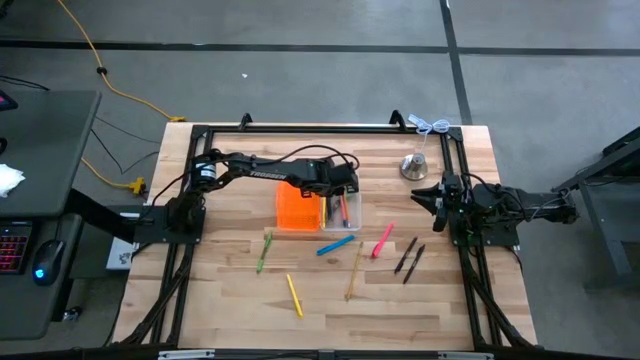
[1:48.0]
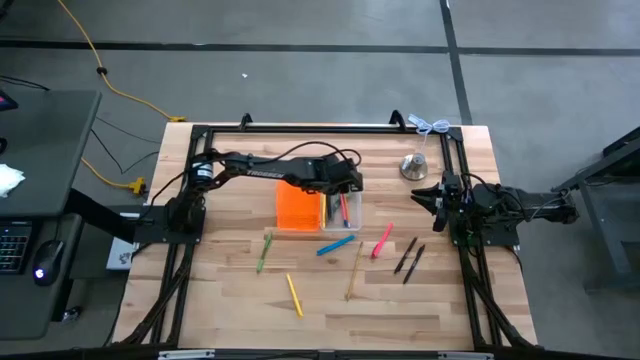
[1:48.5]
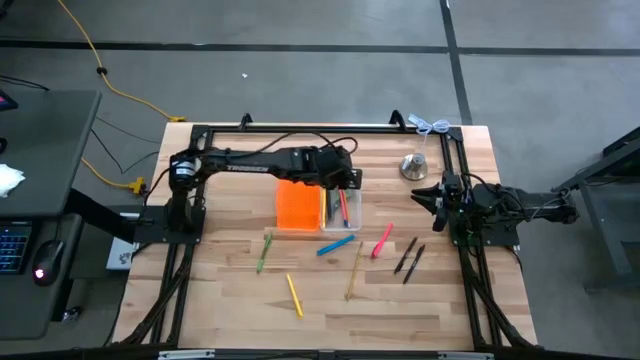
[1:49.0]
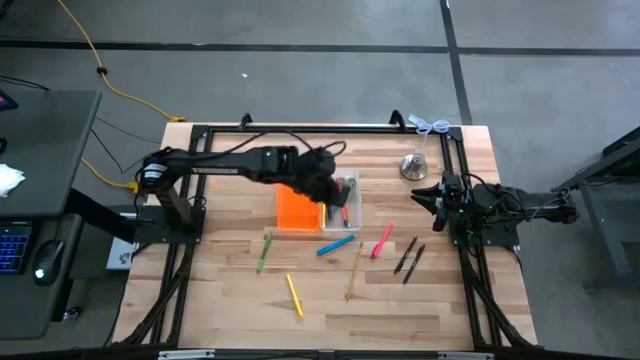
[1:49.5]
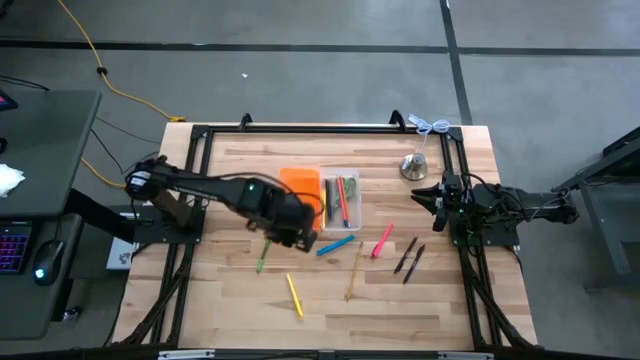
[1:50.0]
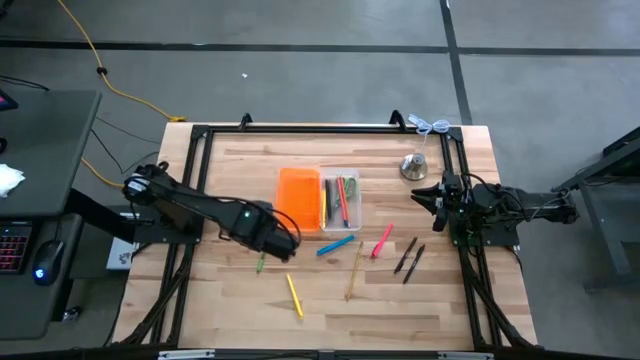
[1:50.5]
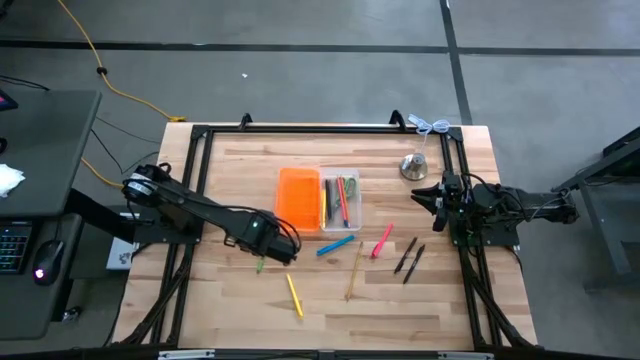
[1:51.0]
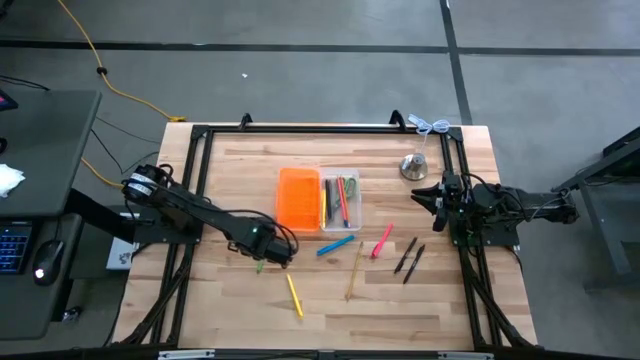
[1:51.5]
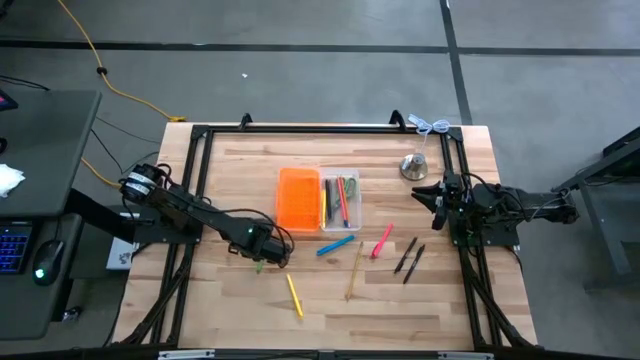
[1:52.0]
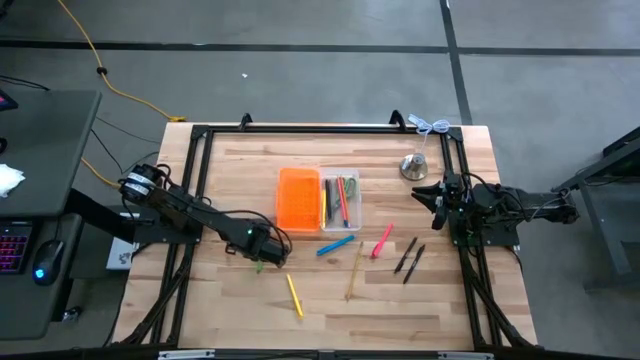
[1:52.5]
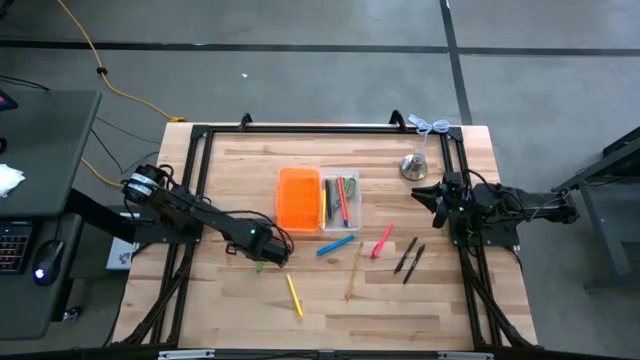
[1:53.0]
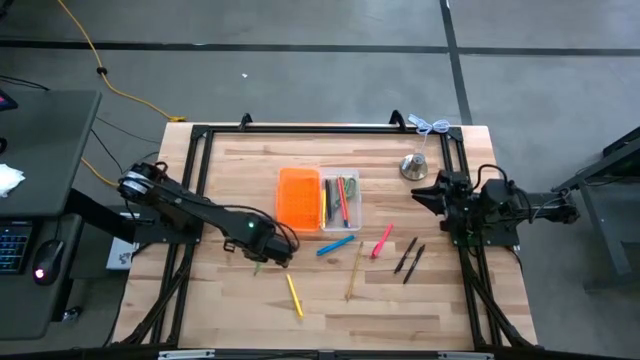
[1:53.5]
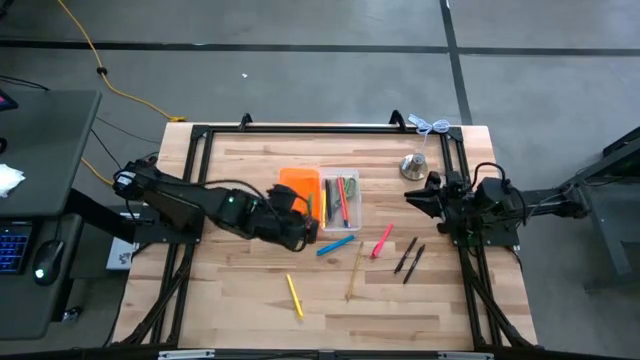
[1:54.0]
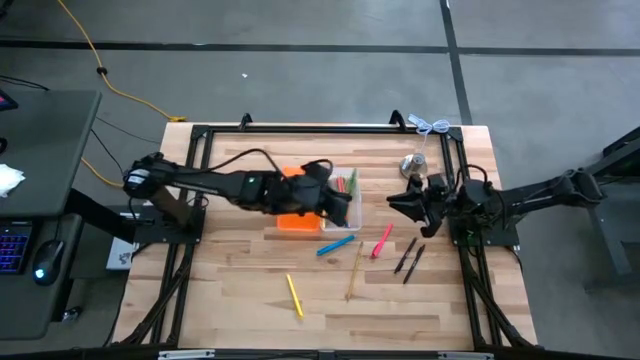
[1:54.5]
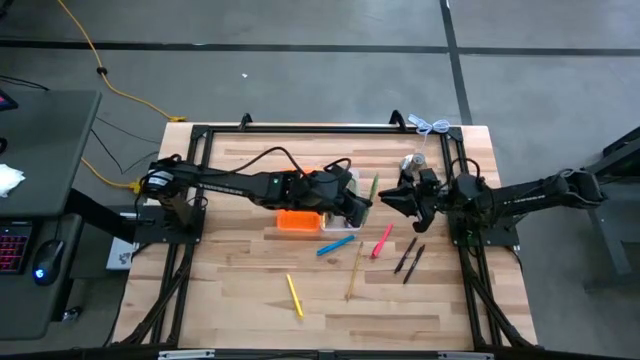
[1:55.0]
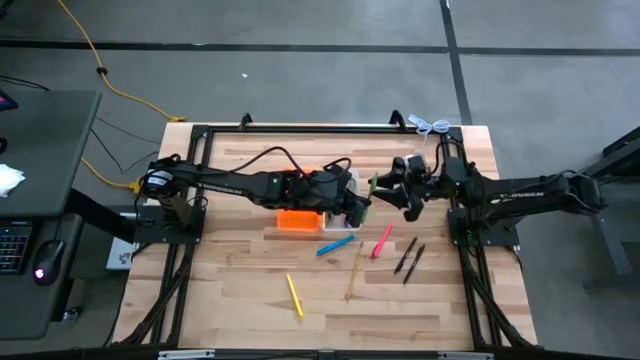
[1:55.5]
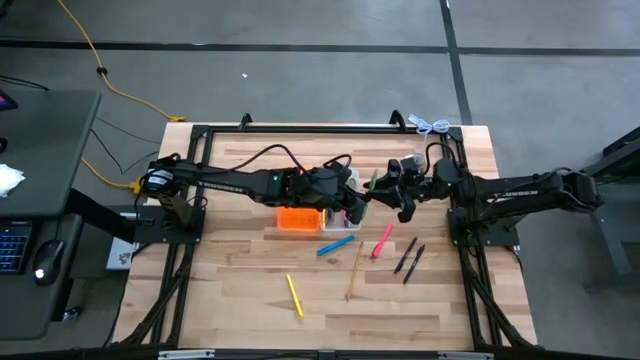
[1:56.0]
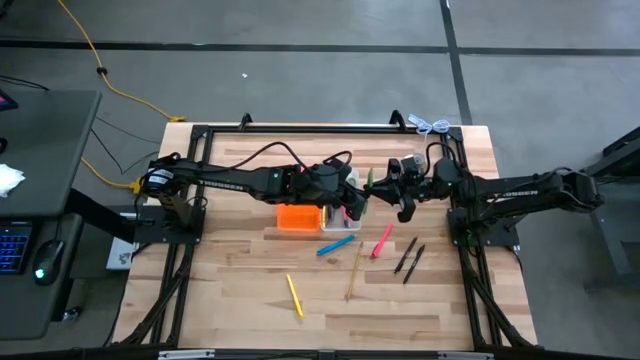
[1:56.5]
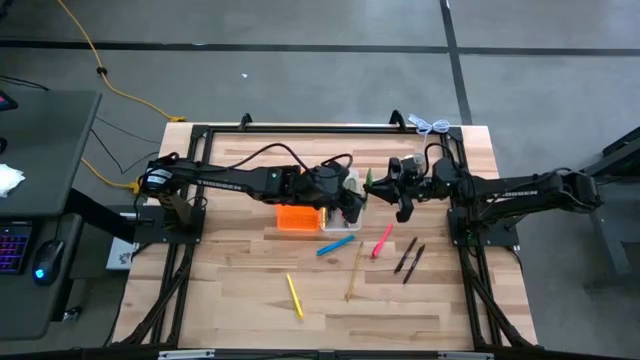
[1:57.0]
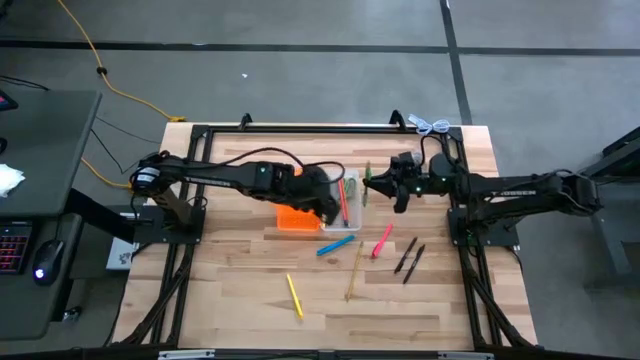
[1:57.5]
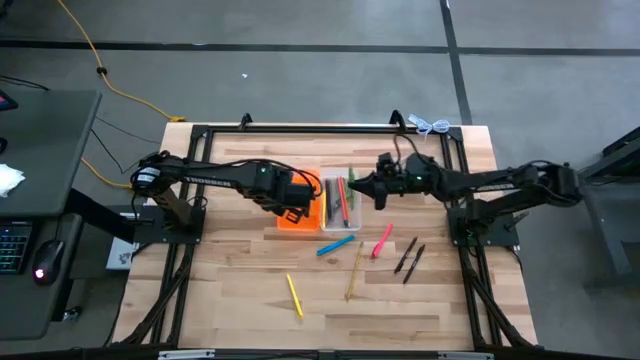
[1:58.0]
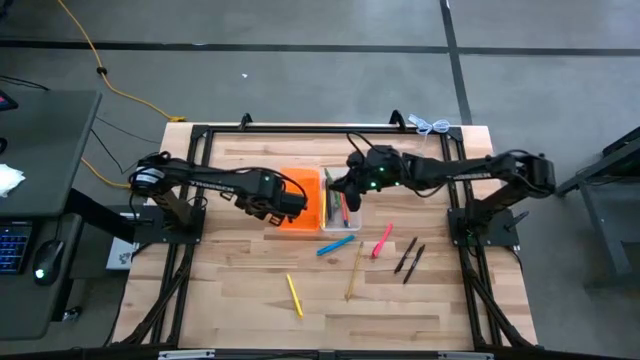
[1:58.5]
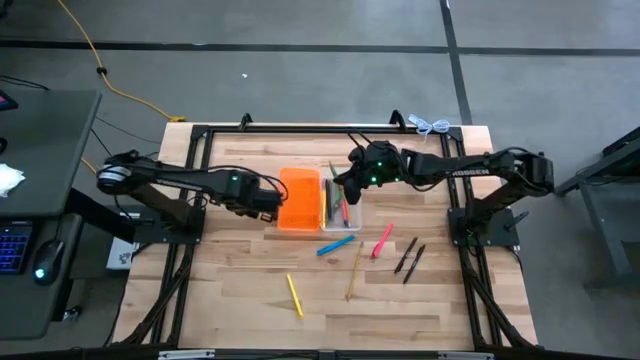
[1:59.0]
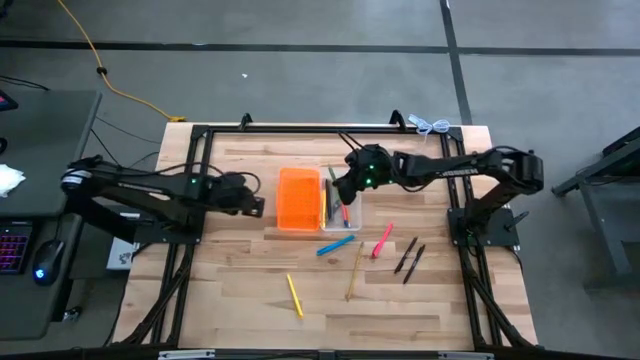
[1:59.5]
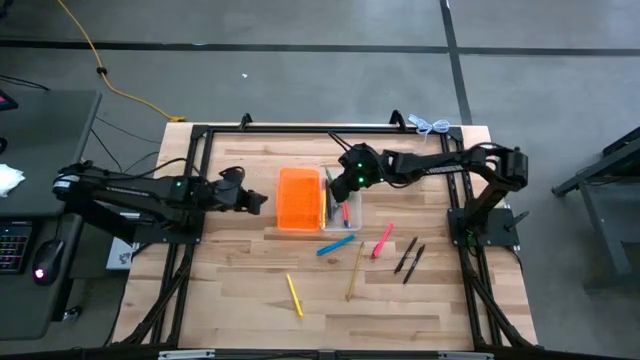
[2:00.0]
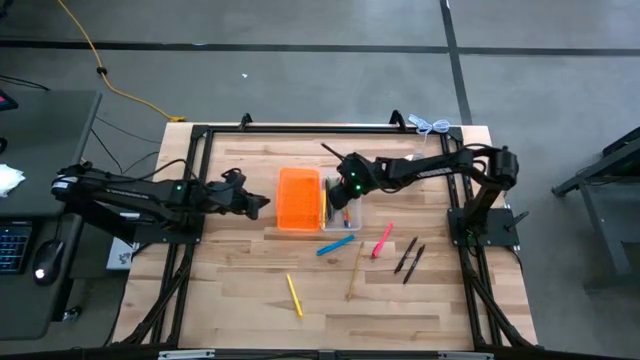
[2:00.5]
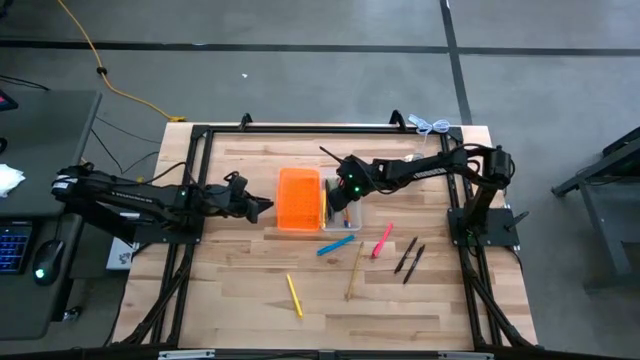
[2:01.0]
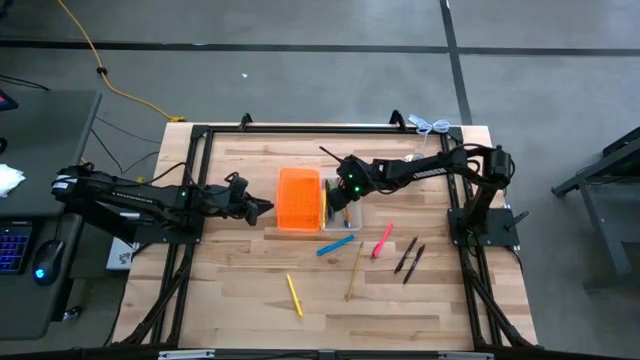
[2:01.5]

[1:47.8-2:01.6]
Task: Pick & place school supplies into a supply box
Put the green pen into the supply box

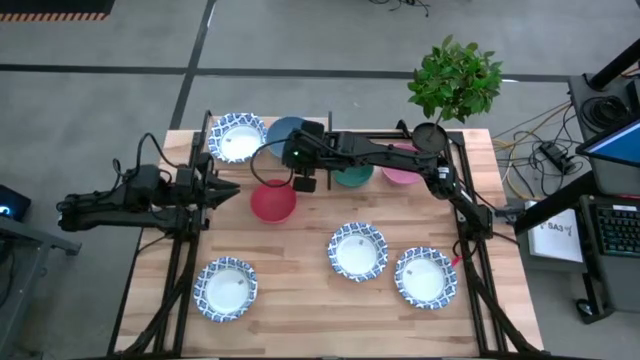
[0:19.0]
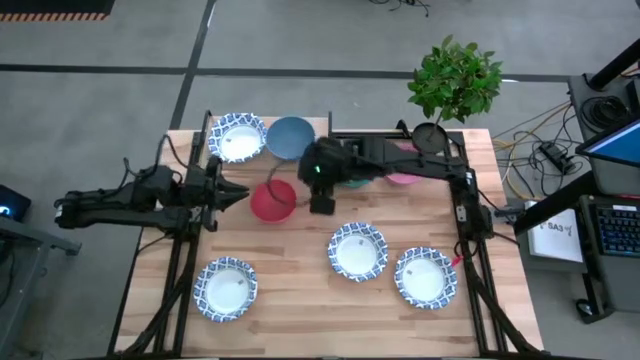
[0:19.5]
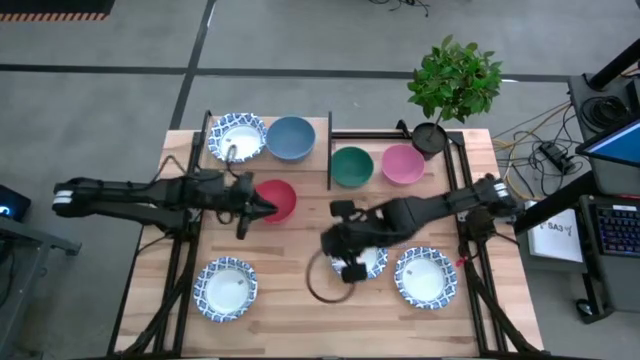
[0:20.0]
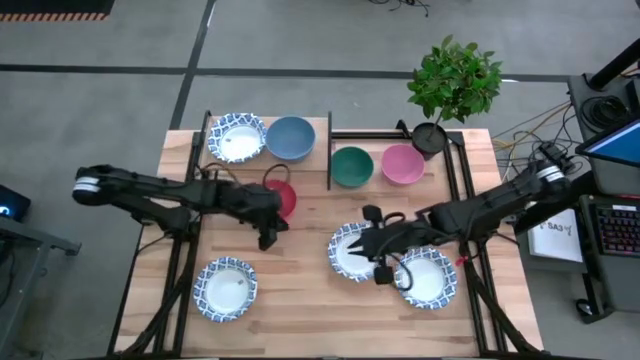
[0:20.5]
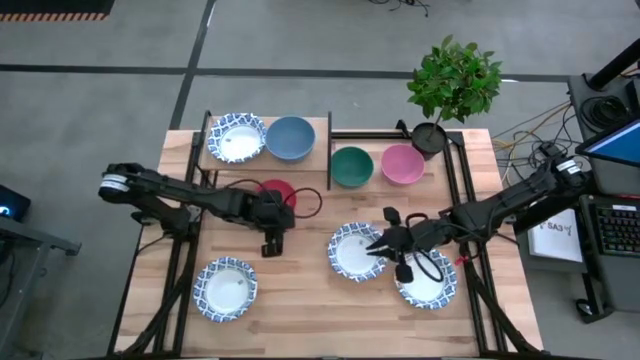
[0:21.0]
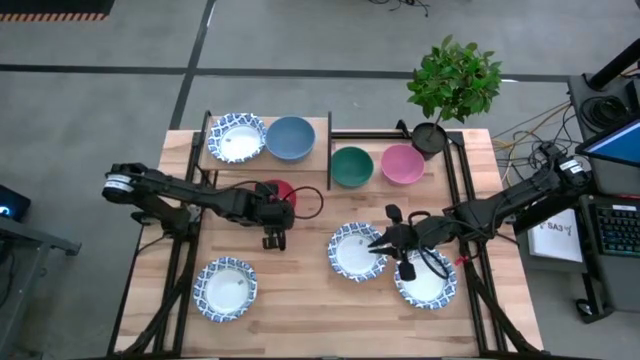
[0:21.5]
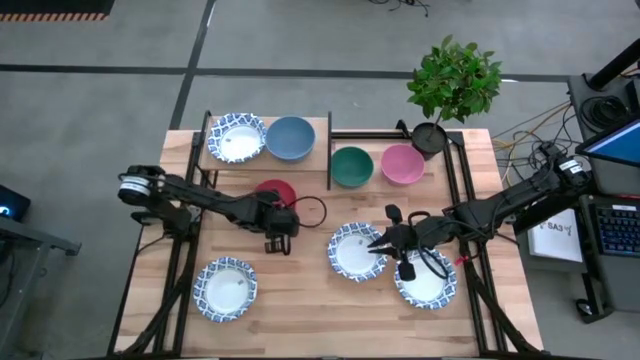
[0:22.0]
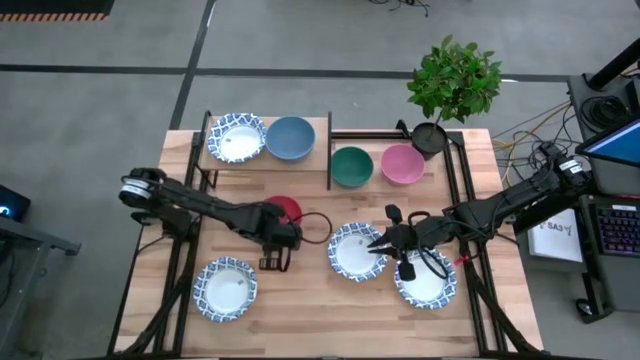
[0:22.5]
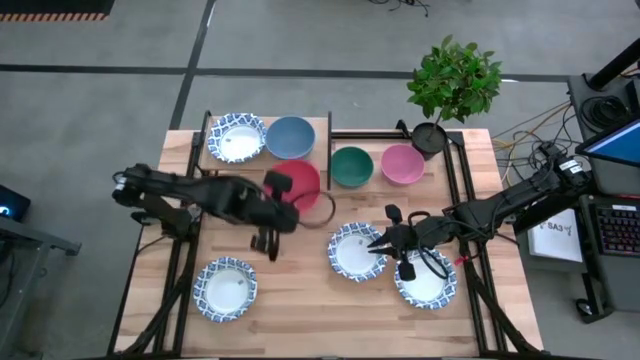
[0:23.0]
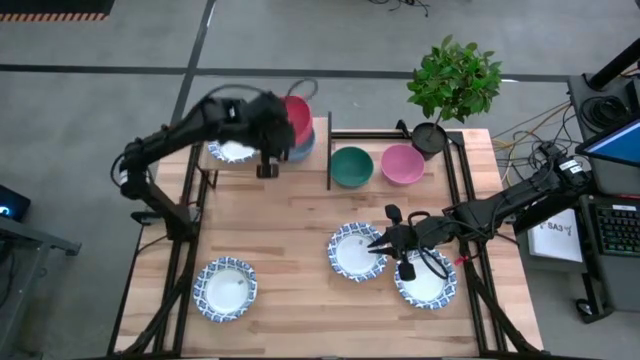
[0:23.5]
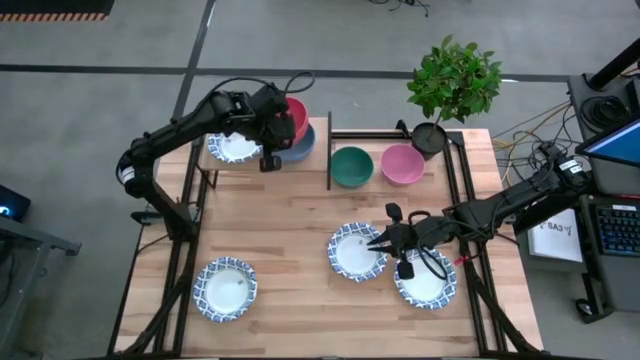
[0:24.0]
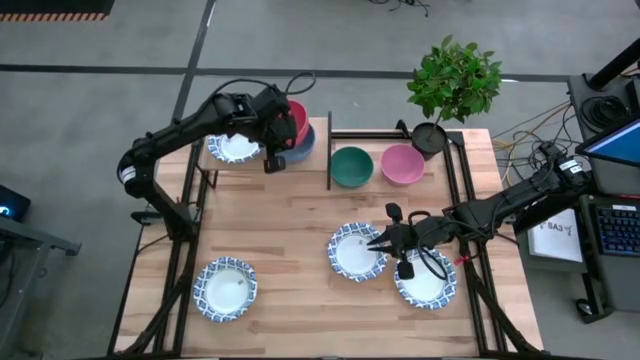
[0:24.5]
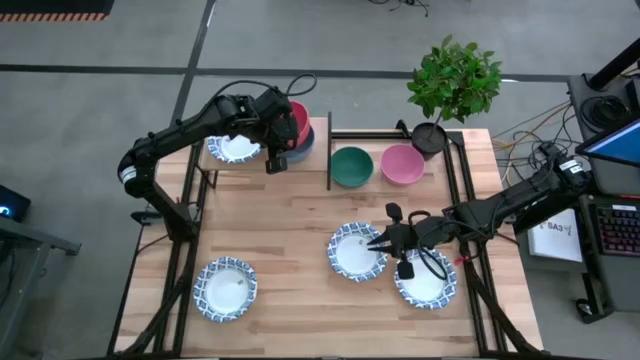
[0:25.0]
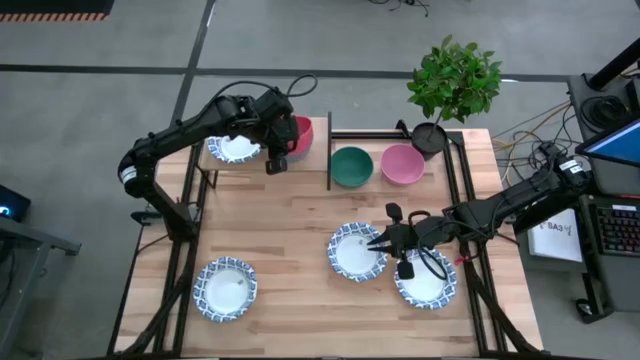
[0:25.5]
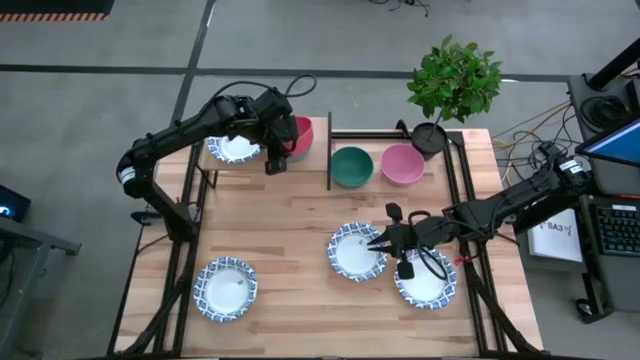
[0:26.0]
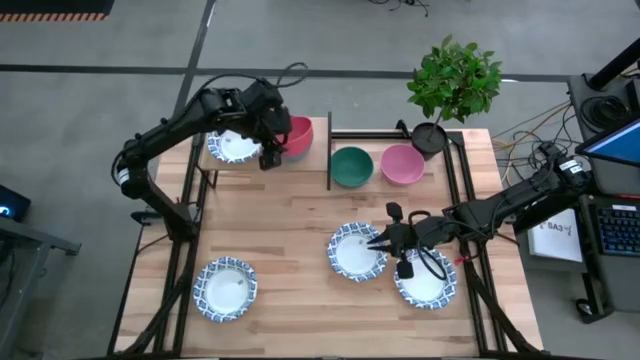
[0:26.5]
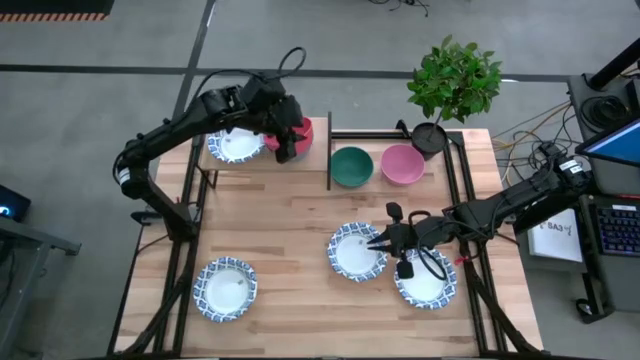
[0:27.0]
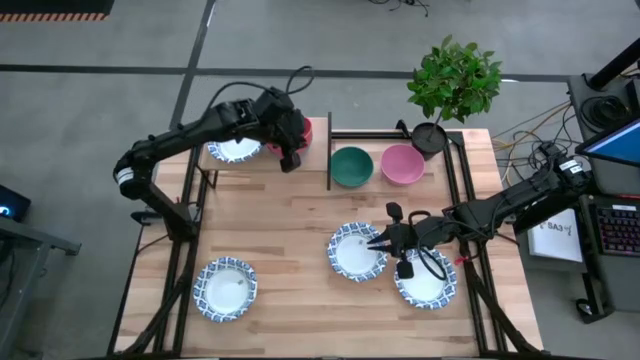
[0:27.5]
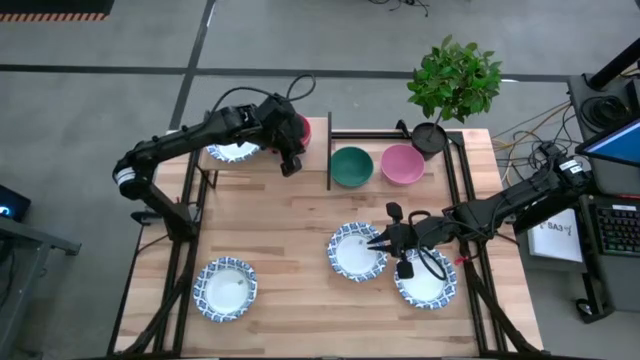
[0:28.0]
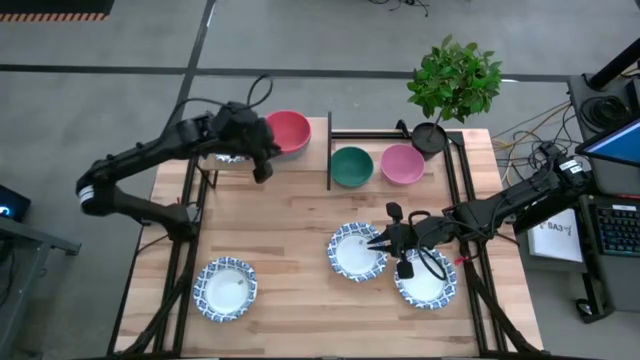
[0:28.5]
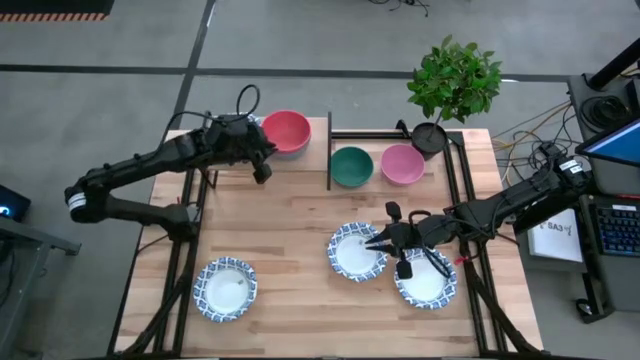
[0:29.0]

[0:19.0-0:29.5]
Task: Place and stack bowls onto a shelf
Stack the orange bowl on top of the blue bowl
